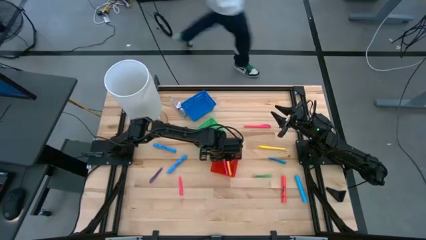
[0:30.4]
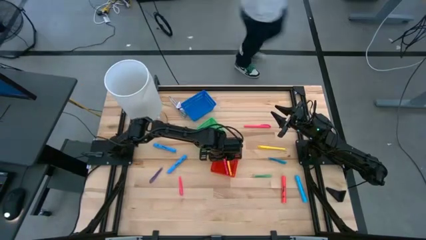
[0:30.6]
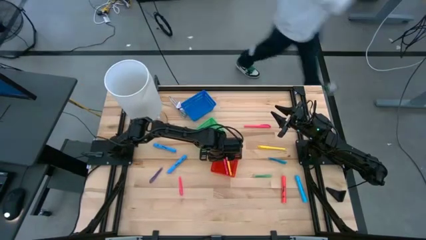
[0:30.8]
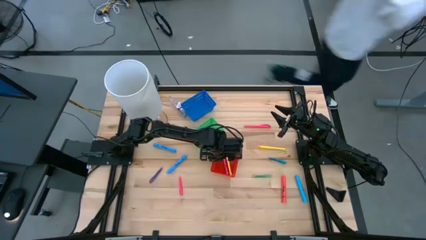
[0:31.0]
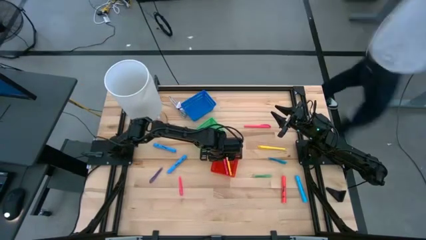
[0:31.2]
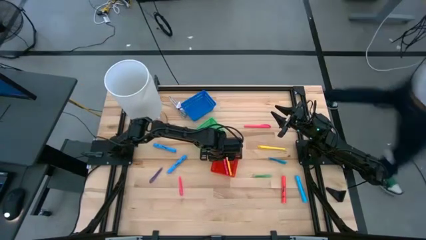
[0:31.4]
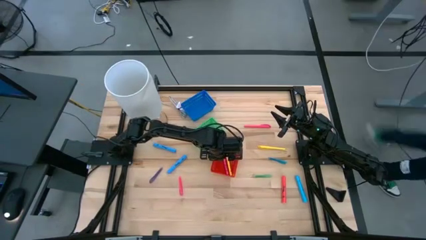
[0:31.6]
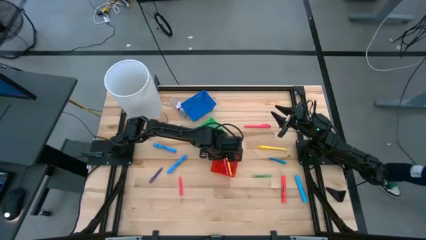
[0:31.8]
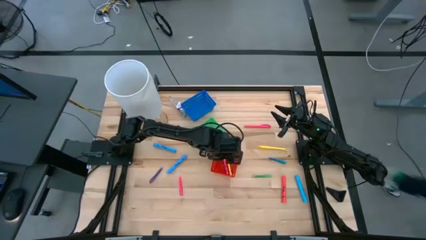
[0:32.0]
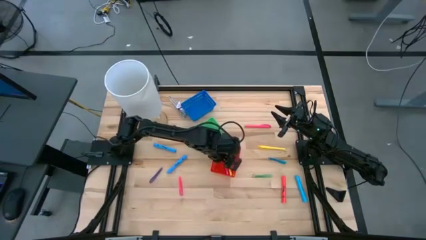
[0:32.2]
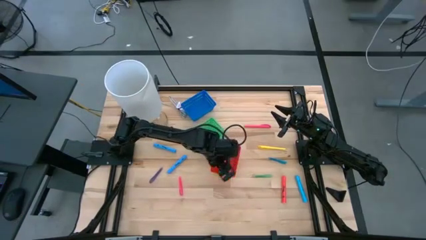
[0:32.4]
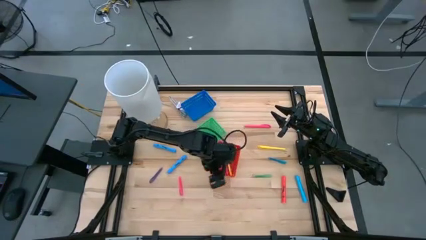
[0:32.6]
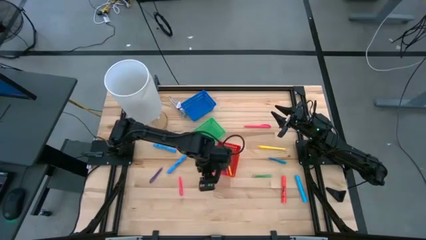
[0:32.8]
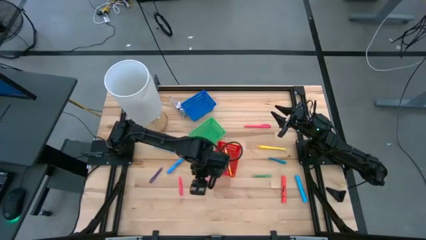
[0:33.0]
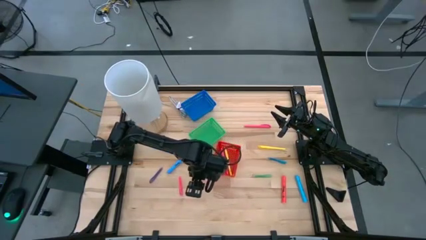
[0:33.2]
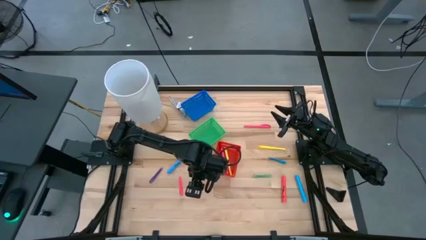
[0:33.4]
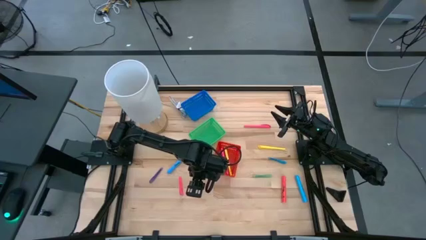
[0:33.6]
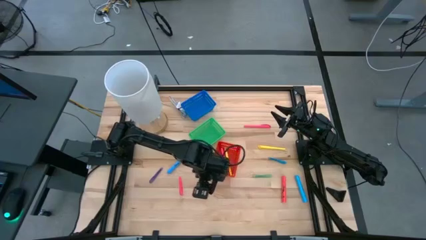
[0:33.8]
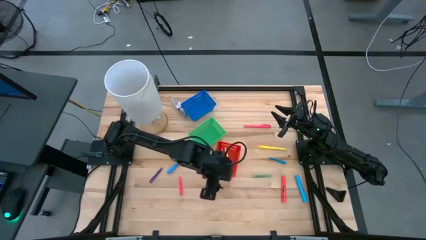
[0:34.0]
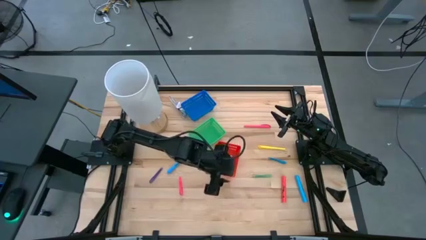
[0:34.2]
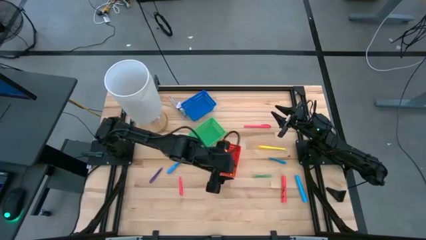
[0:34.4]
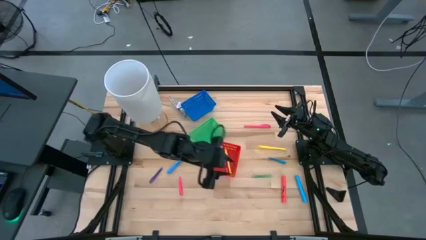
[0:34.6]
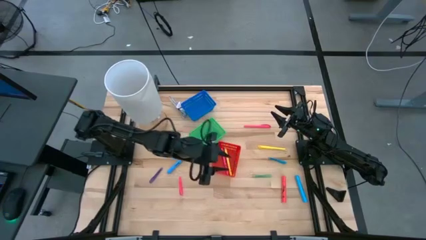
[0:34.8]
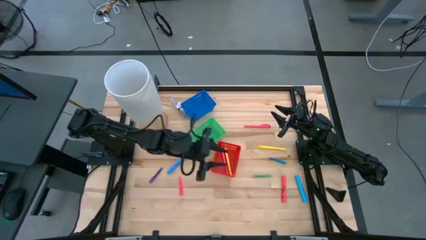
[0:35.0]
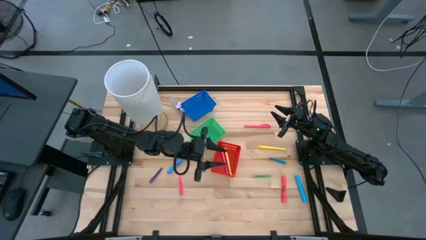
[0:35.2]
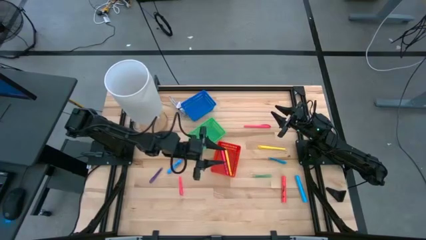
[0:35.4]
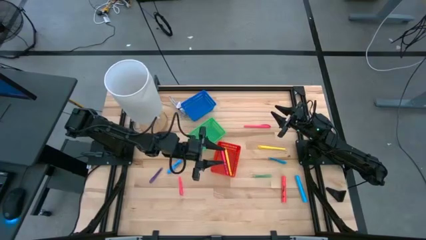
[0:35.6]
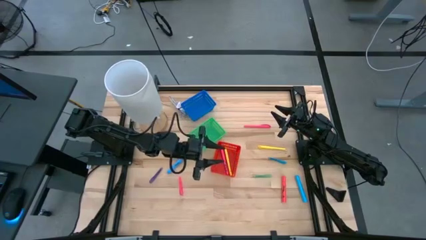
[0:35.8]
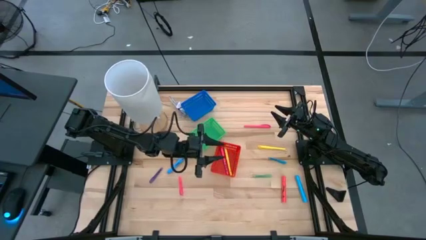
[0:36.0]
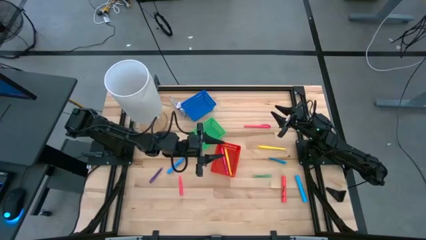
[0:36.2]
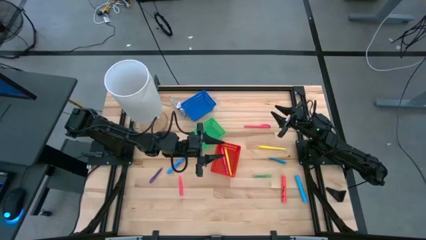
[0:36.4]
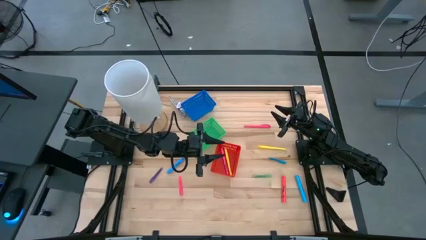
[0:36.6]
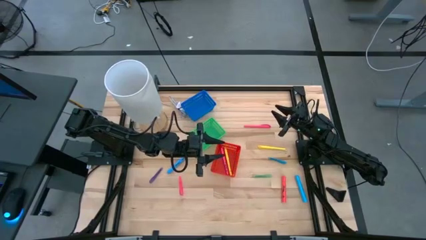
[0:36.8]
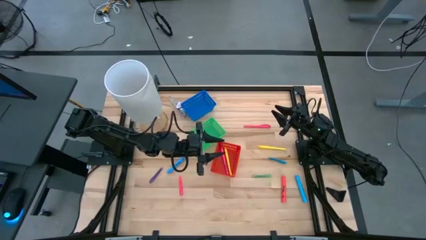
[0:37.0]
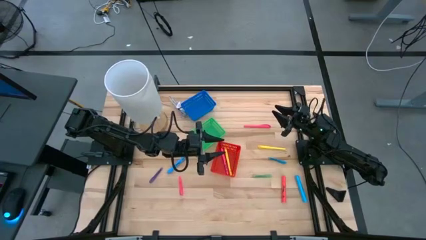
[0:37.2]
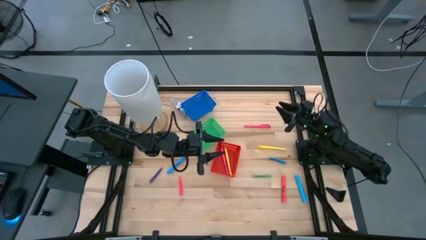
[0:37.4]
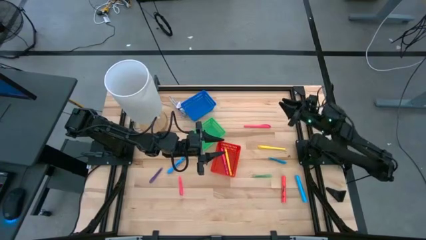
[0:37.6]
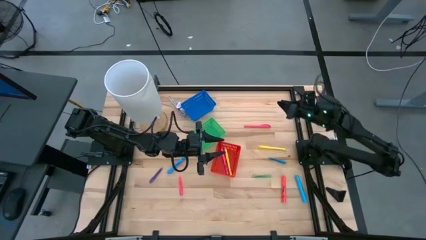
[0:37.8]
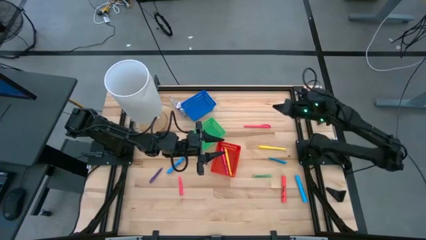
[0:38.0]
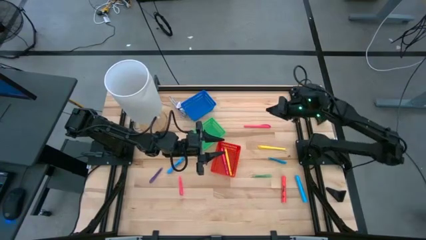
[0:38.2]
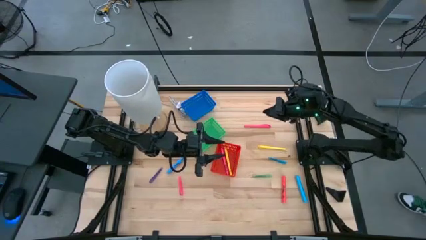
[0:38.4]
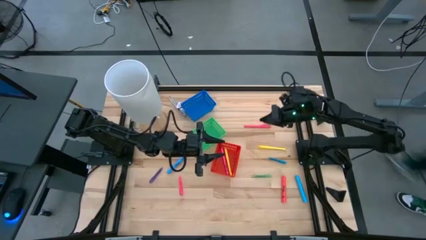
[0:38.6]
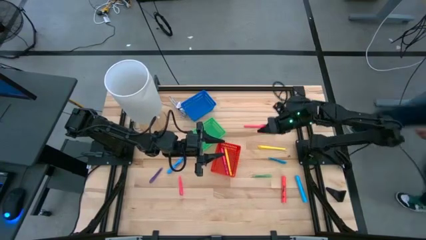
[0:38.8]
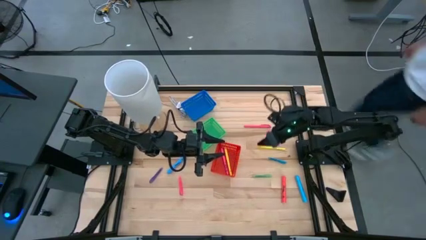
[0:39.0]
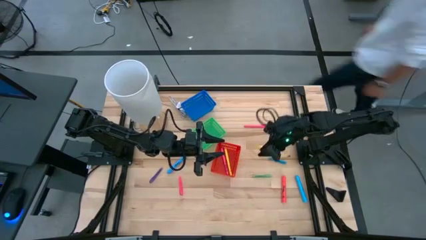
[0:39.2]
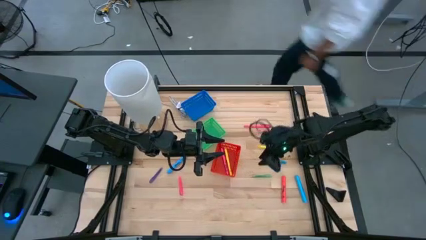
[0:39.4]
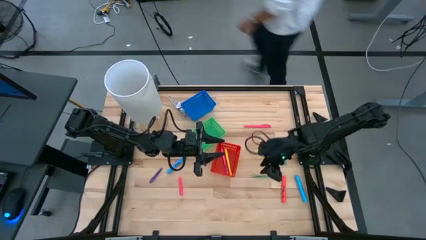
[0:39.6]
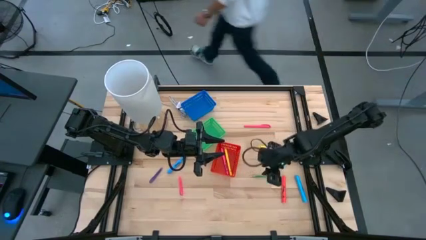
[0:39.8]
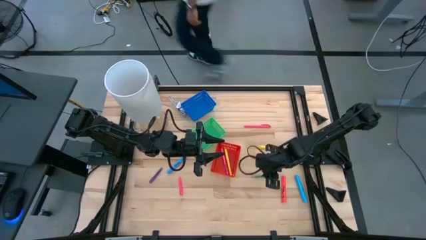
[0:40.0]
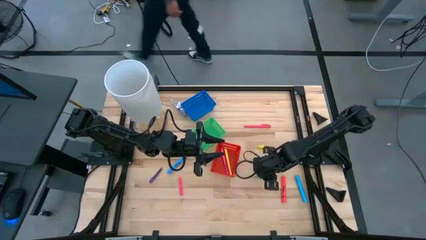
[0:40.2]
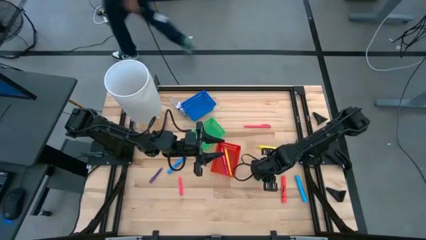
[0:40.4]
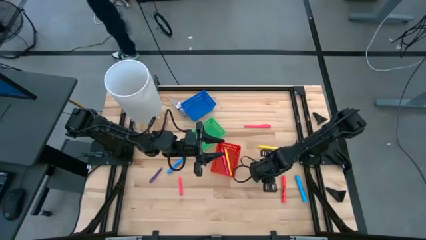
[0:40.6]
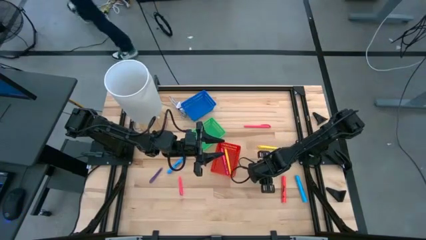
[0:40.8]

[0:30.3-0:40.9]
Task: Pick & Place Markers
Put the small green pen into the blue bin
